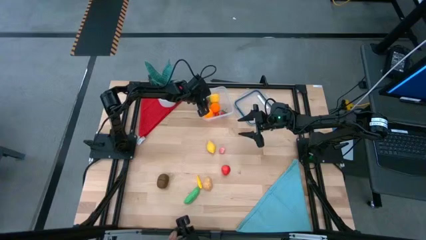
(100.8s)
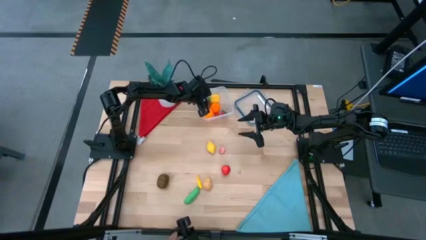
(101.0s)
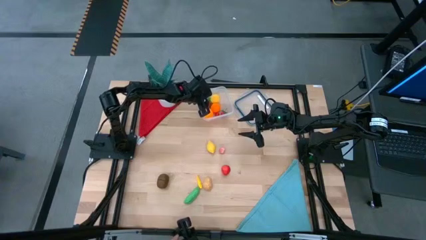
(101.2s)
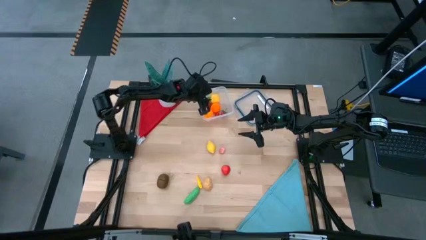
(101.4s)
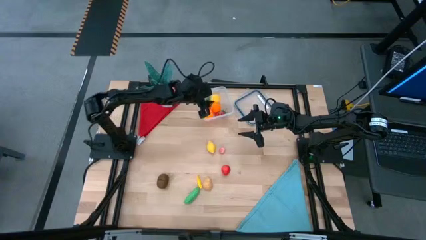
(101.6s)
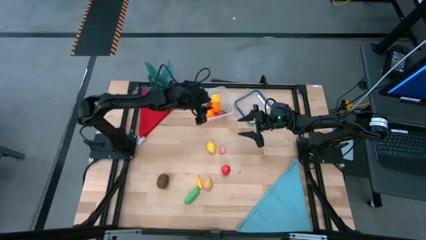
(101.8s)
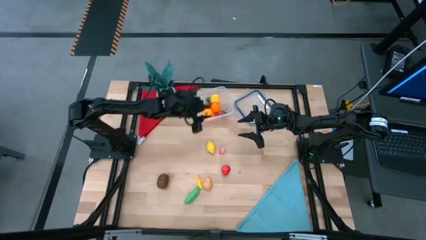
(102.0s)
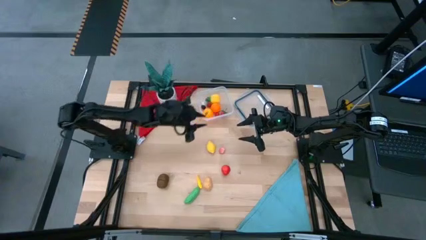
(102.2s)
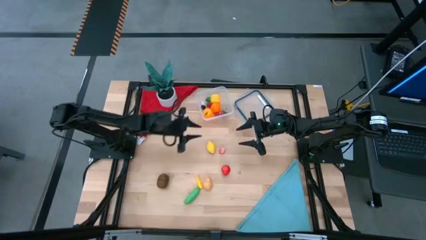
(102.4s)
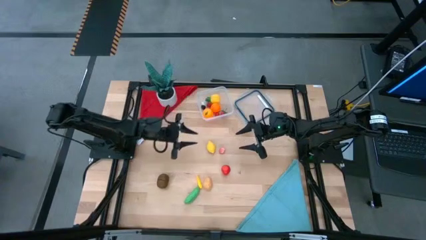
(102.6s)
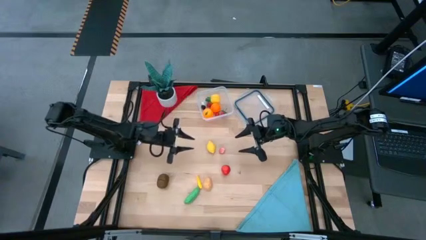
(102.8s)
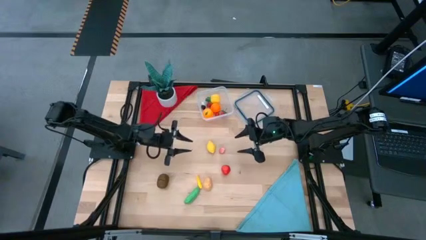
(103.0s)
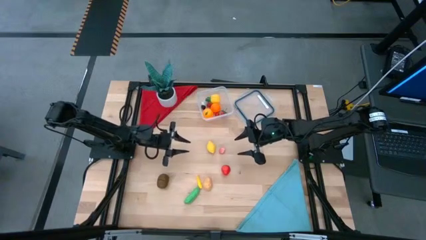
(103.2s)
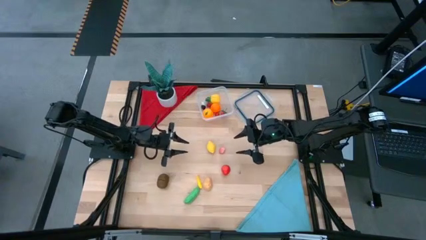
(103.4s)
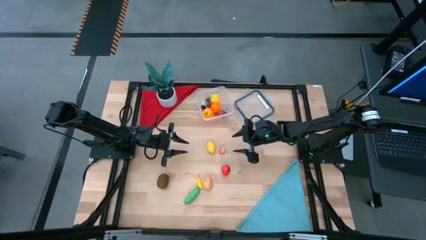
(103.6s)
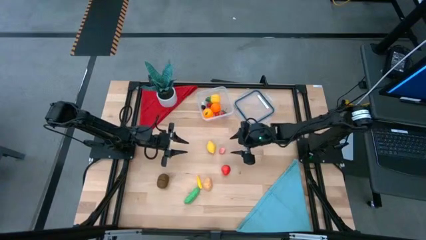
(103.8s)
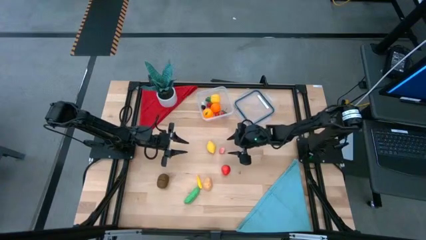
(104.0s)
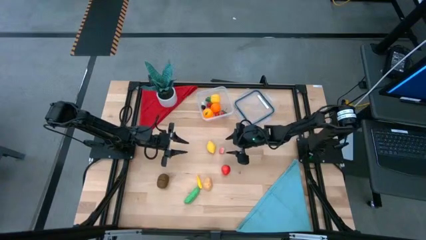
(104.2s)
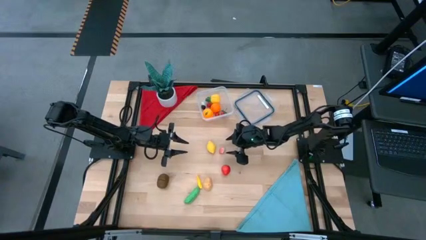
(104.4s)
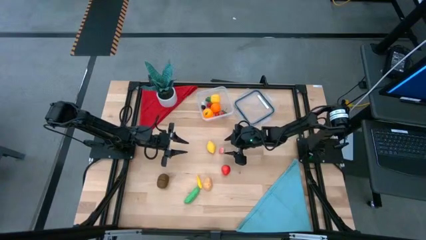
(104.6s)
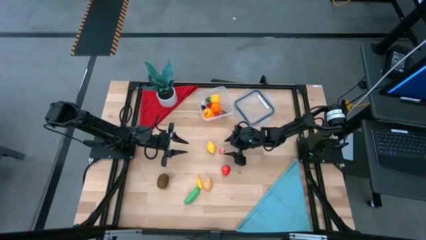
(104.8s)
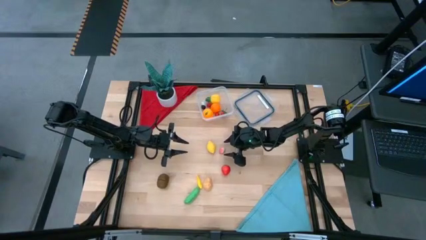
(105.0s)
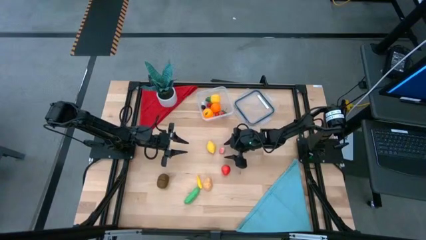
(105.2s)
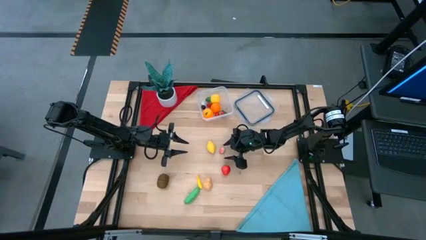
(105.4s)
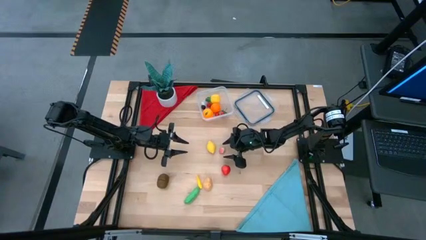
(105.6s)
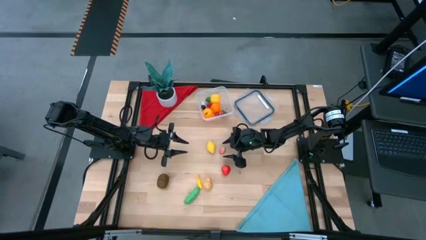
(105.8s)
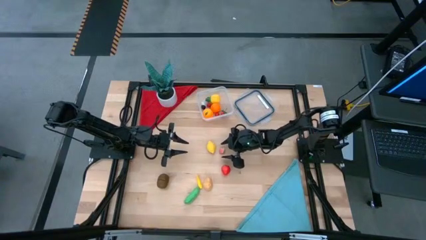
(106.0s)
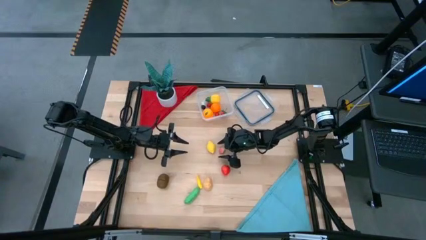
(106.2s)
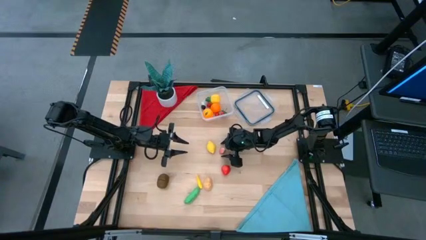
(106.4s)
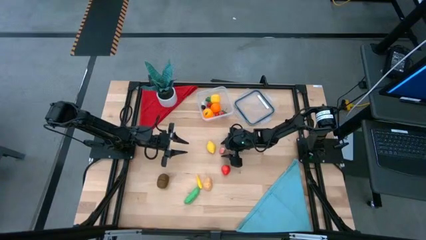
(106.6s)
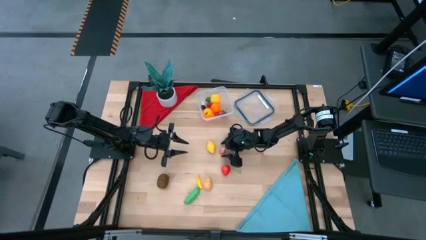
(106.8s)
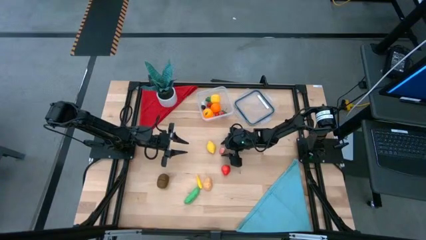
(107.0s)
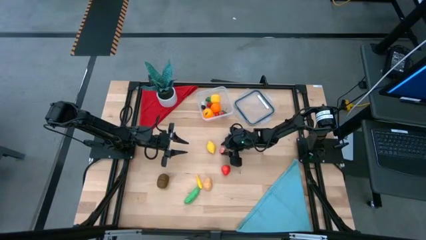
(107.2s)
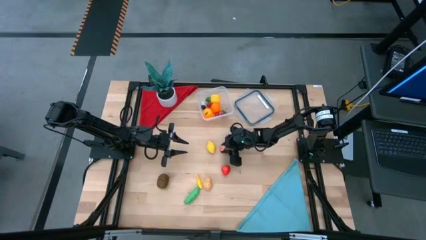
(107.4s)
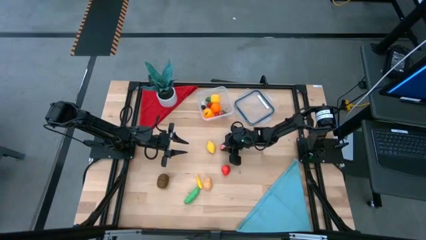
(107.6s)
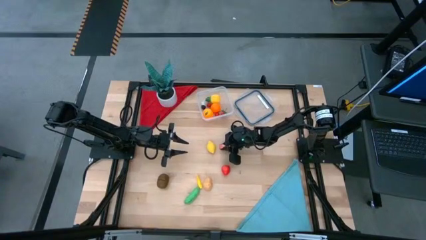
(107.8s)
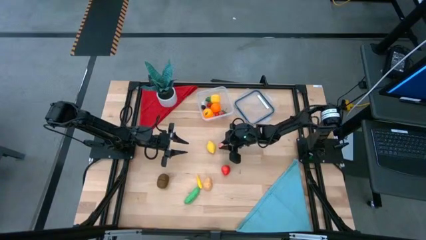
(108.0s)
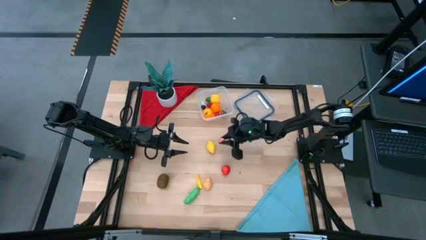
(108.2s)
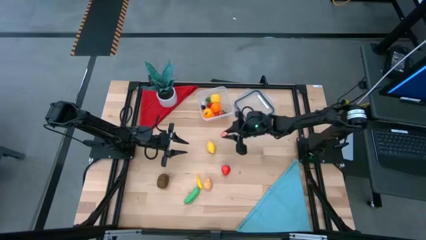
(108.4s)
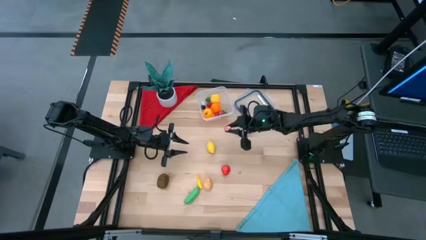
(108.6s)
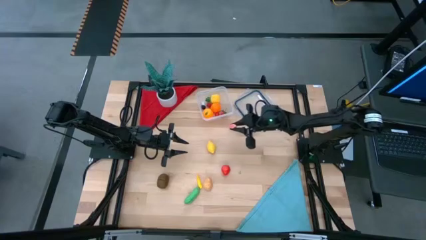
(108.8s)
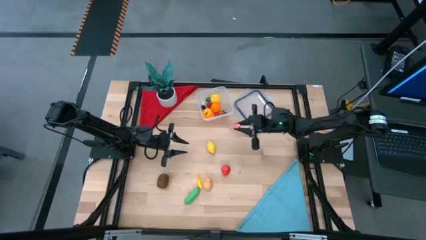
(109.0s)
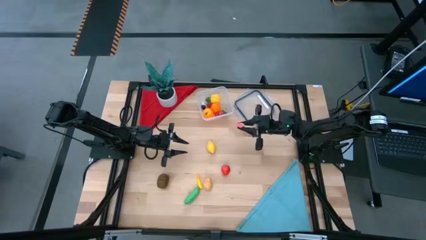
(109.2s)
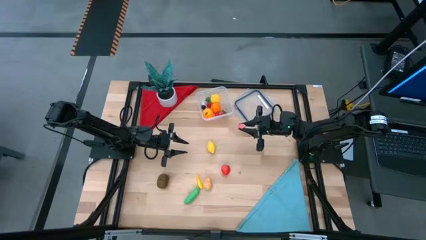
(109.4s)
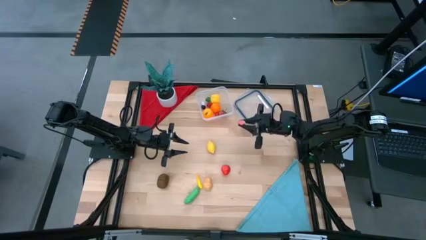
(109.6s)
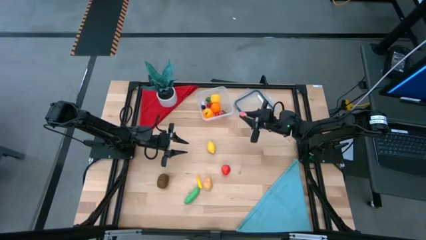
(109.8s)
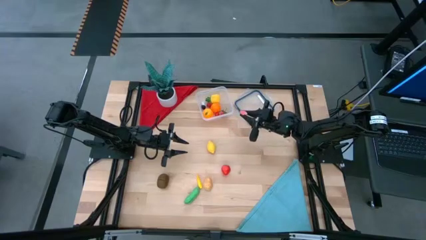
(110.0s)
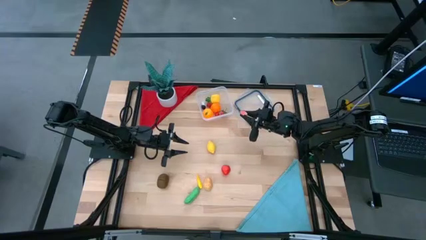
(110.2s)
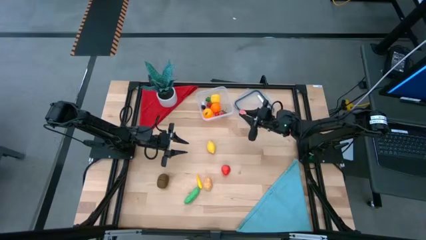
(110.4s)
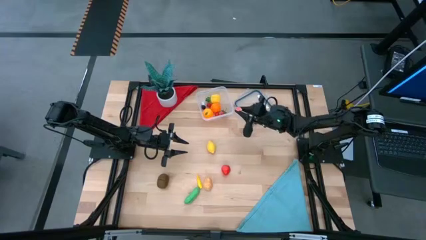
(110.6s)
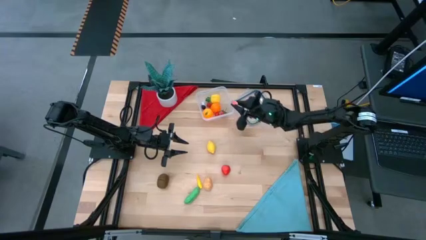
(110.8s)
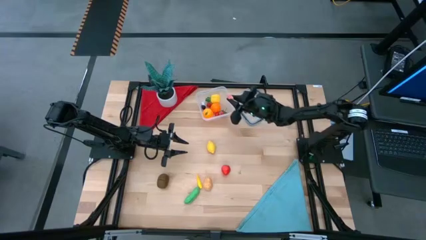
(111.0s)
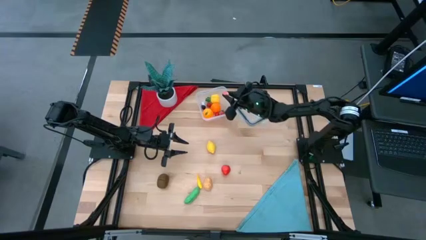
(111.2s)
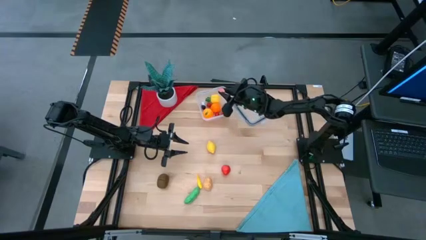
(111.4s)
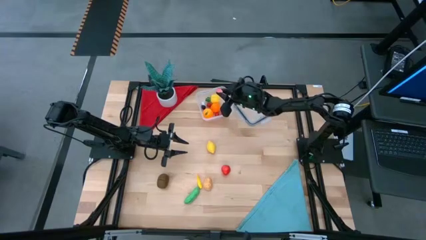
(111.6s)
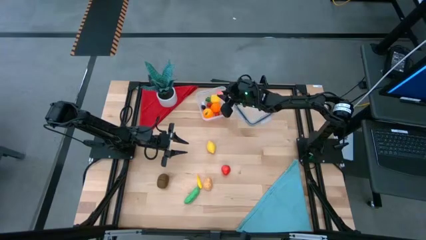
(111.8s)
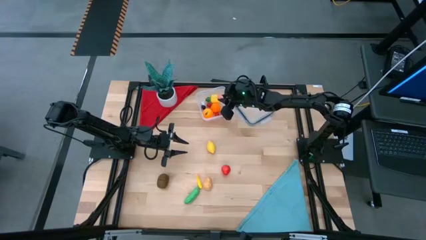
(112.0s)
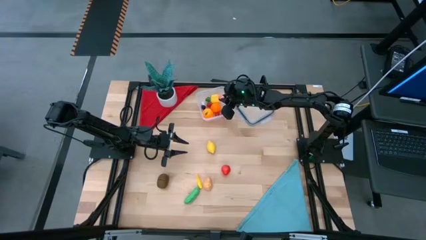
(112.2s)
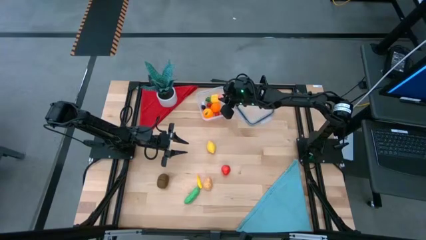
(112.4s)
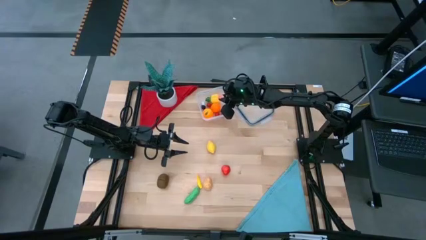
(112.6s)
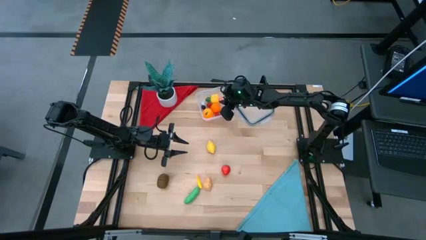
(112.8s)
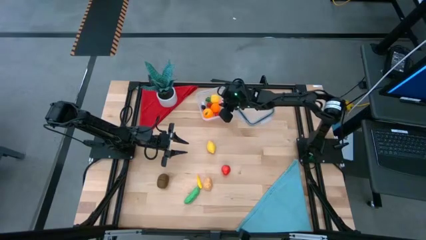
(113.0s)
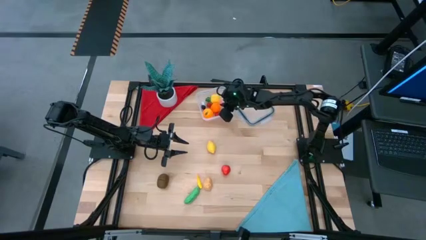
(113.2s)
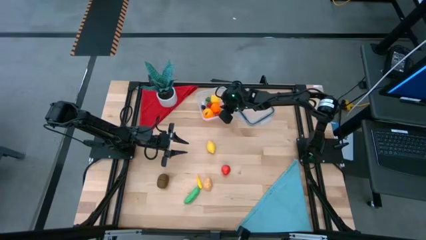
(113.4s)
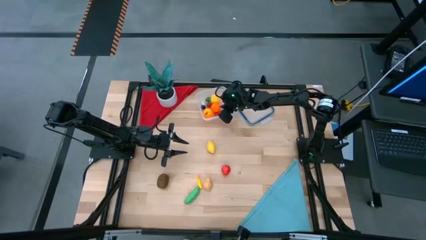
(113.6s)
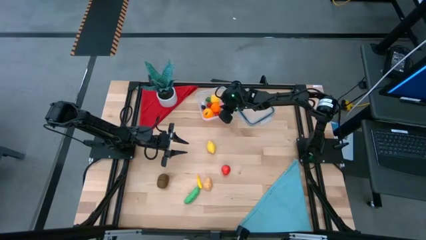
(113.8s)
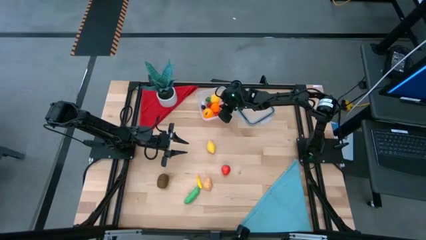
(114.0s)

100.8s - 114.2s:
Task: Pick and placing Produce into tupperware
Put the pink peach into the transparent container

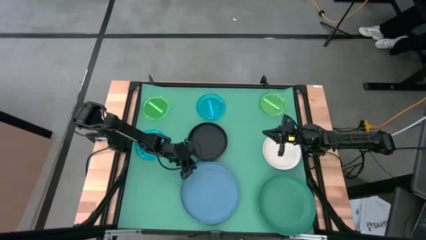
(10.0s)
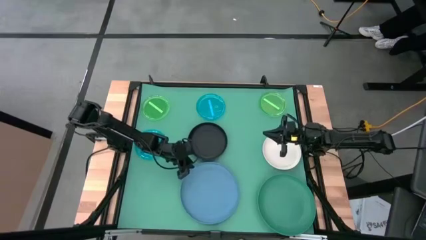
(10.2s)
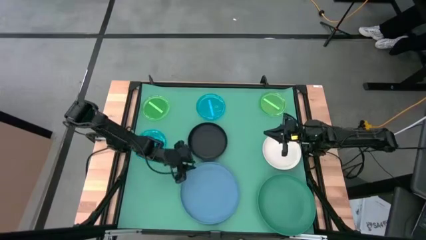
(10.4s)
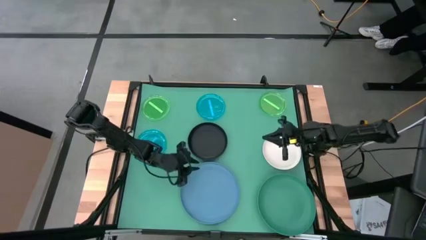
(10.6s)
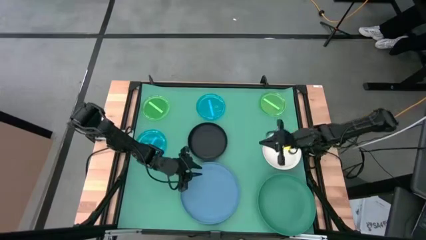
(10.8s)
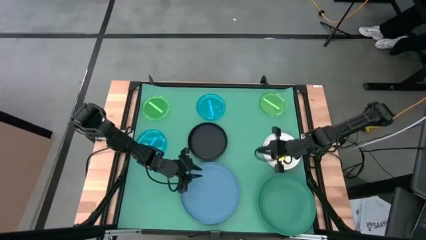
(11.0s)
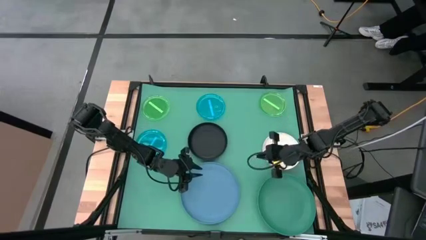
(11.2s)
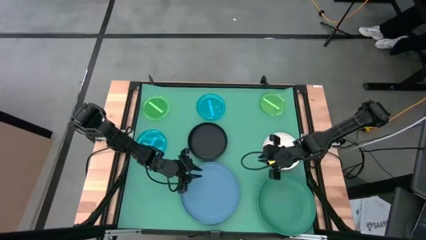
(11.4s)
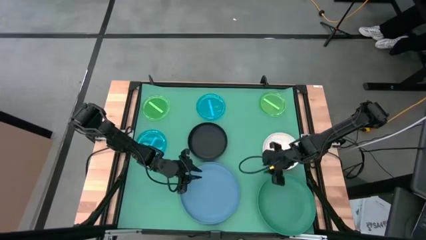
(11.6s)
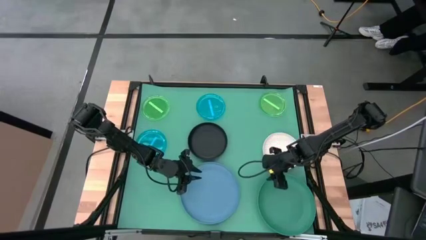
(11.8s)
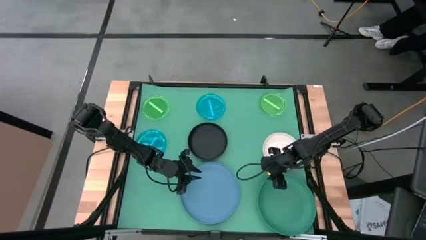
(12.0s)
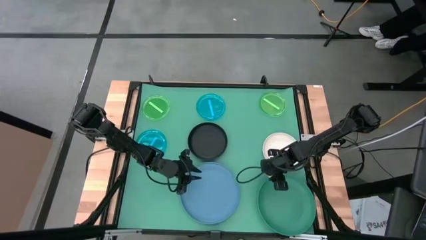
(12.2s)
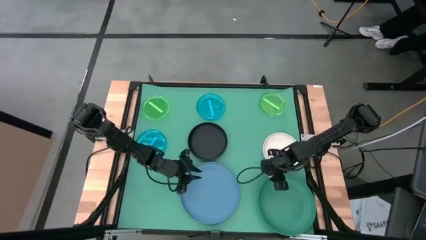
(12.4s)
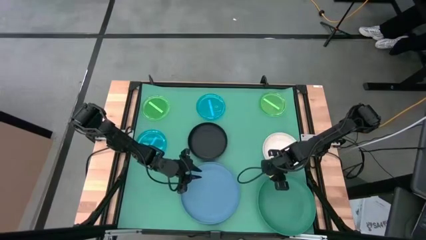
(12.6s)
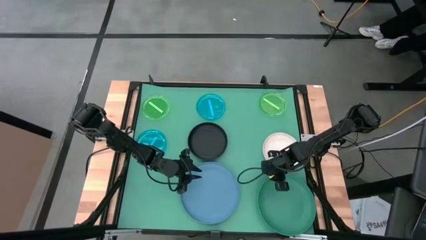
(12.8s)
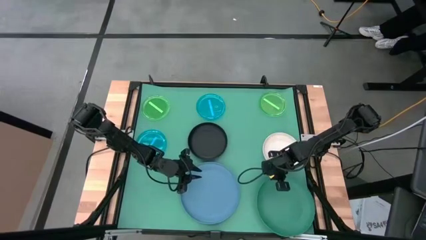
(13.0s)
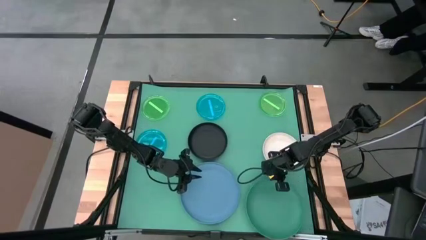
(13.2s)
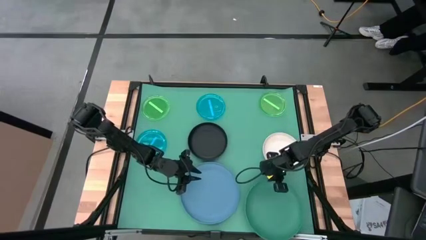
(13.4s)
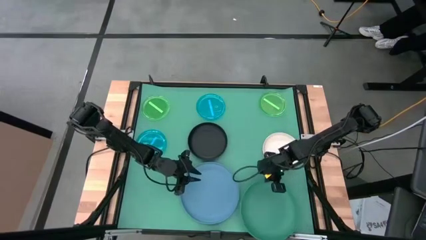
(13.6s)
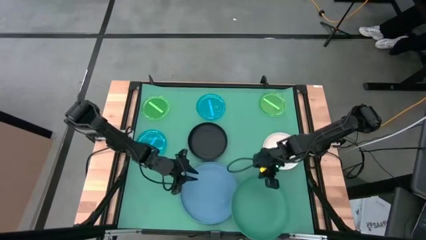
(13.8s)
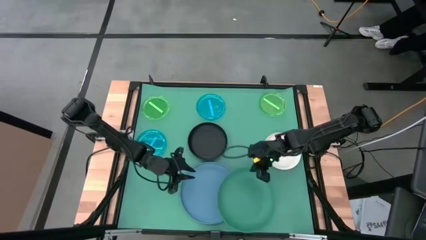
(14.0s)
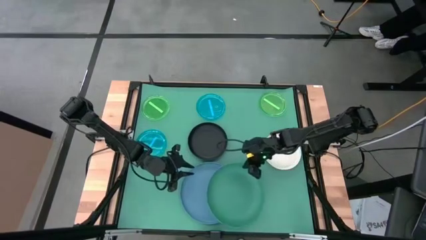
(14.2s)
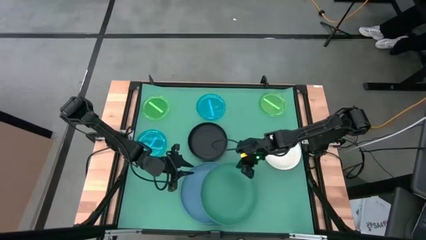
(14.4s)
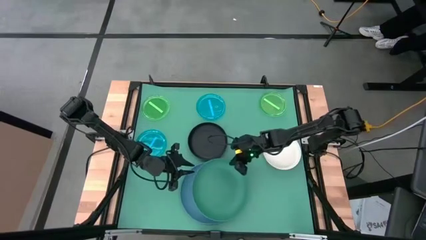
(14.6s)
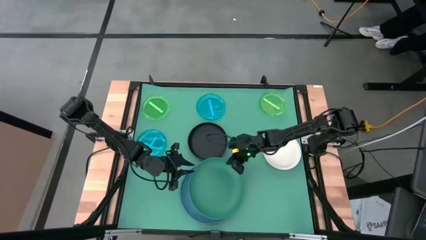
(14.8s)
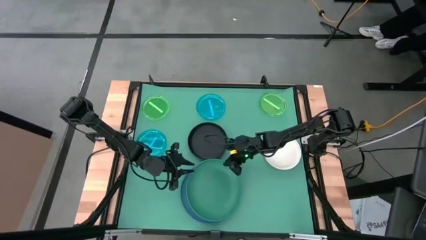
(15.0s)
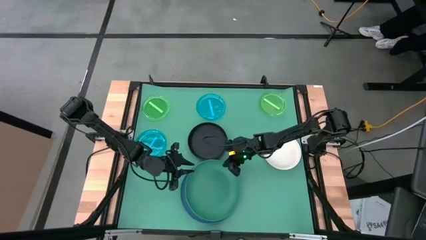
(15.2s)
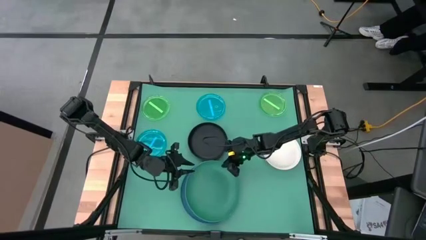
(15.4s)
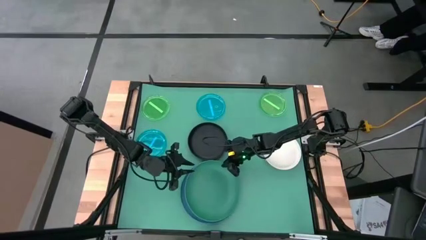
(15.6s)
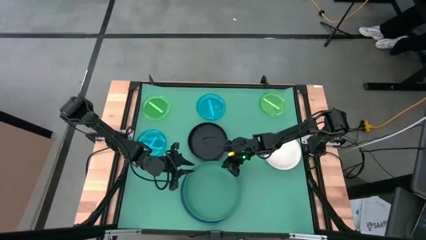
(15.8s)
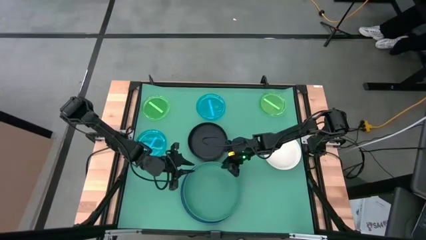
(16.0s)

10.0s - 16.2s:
Task: Stack plastic plates
Stack the dark green plate on top of the blue plate
